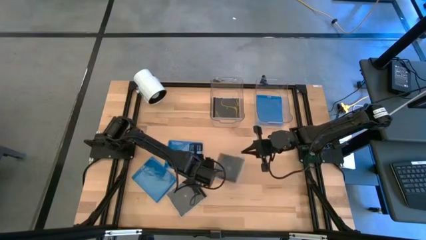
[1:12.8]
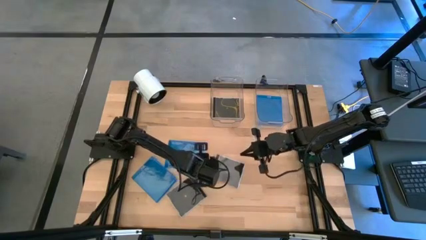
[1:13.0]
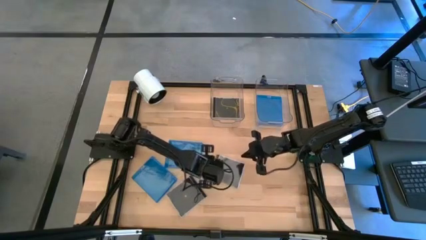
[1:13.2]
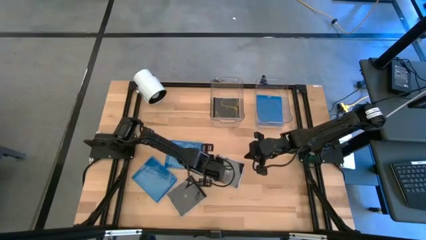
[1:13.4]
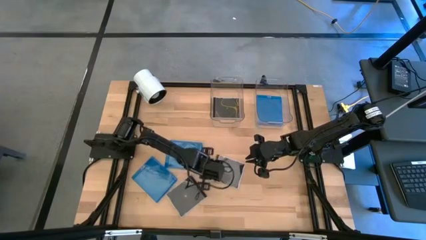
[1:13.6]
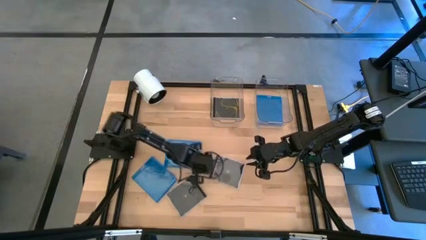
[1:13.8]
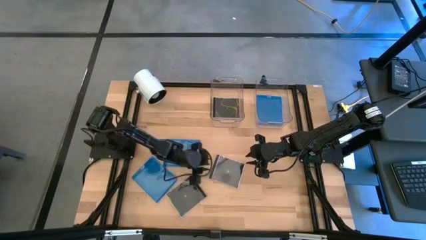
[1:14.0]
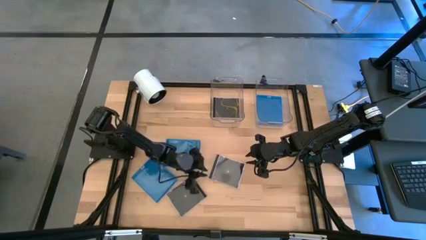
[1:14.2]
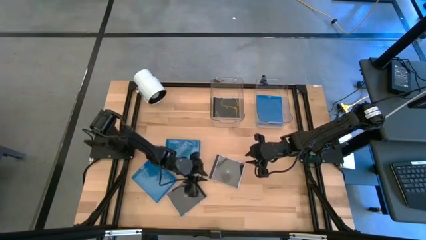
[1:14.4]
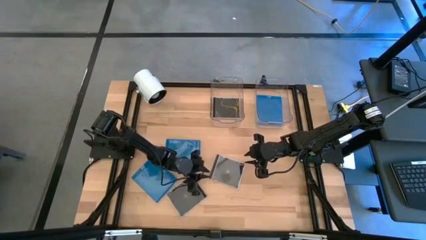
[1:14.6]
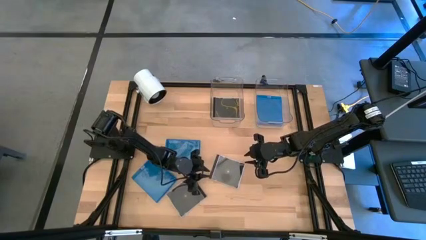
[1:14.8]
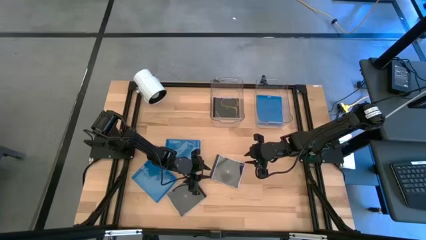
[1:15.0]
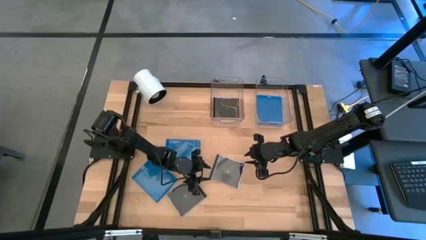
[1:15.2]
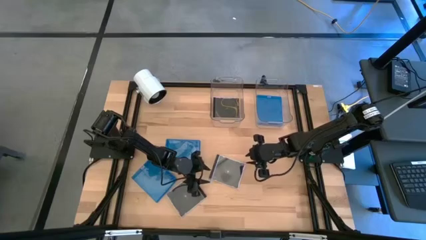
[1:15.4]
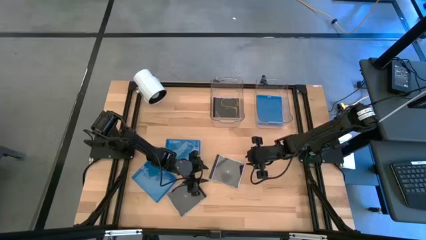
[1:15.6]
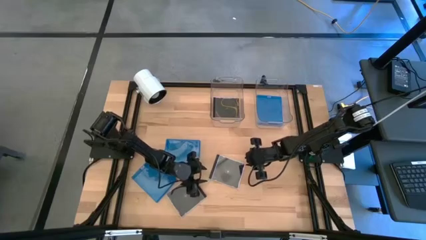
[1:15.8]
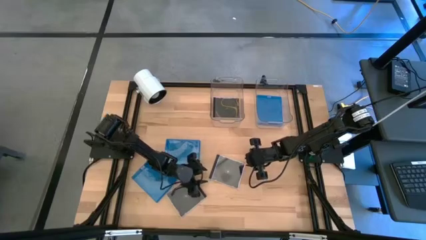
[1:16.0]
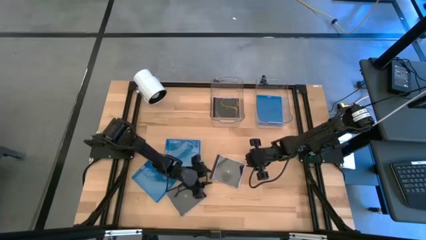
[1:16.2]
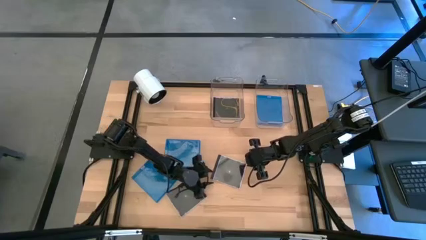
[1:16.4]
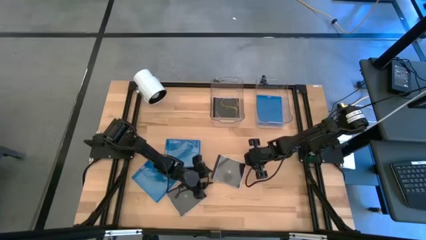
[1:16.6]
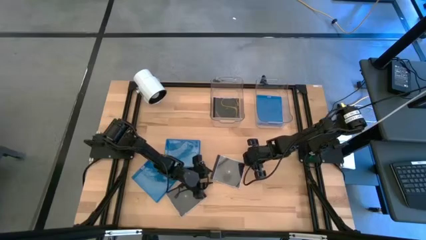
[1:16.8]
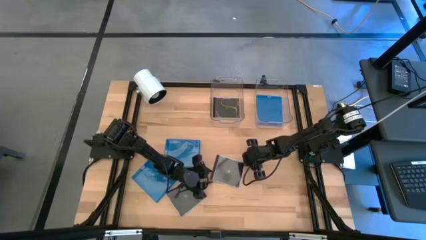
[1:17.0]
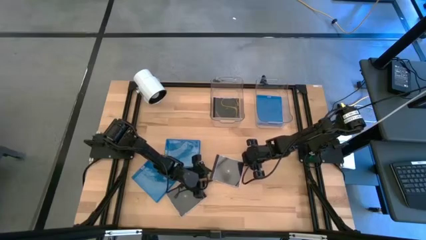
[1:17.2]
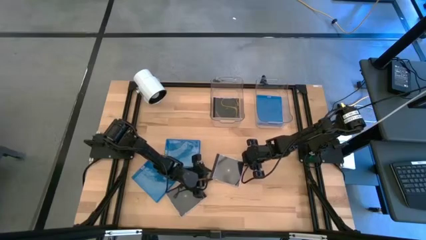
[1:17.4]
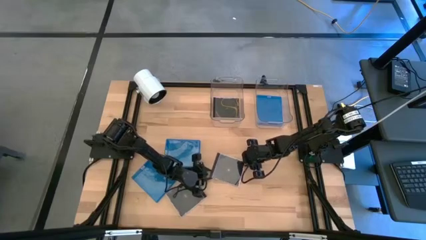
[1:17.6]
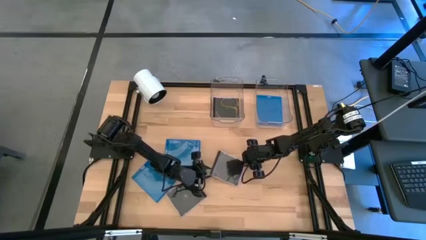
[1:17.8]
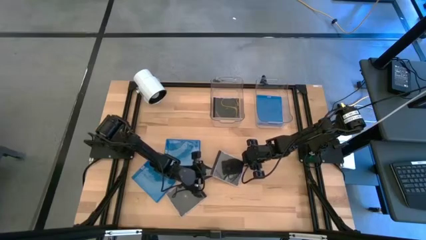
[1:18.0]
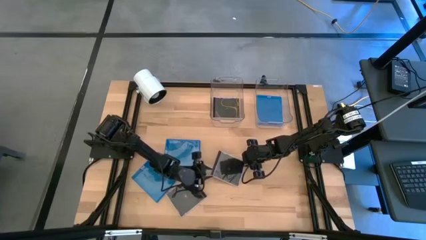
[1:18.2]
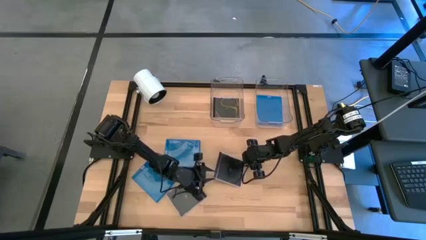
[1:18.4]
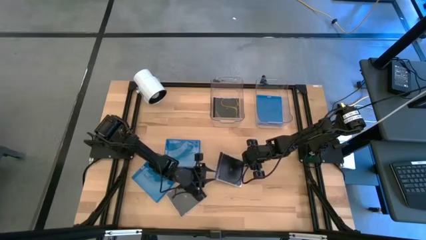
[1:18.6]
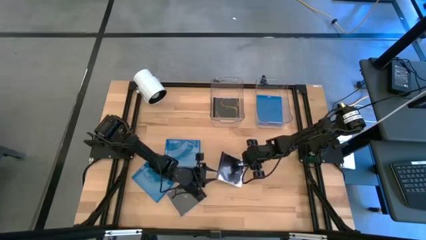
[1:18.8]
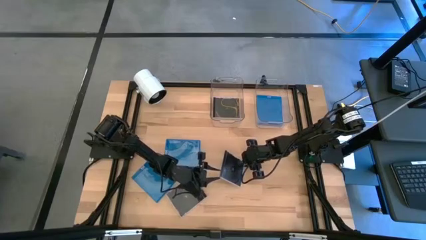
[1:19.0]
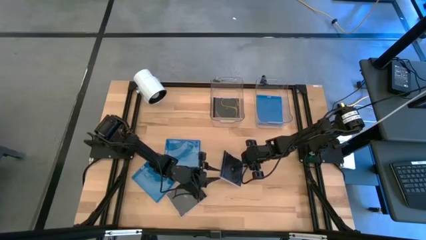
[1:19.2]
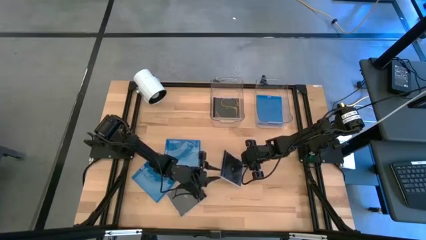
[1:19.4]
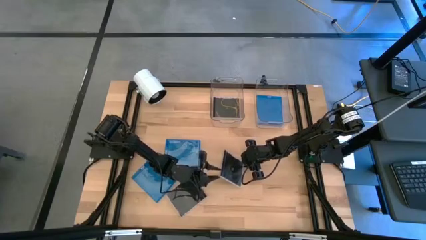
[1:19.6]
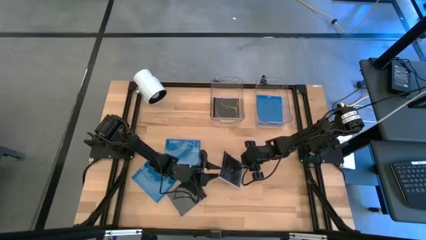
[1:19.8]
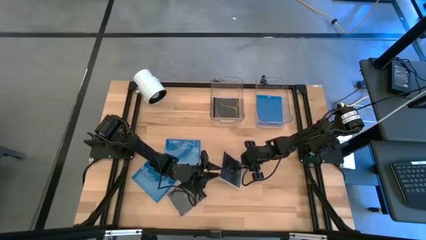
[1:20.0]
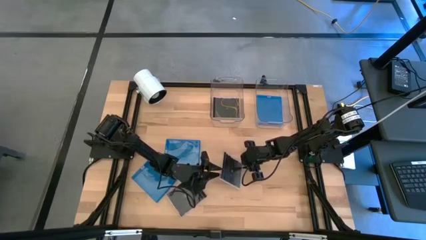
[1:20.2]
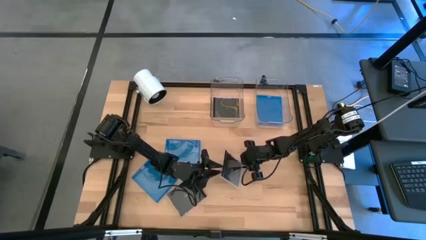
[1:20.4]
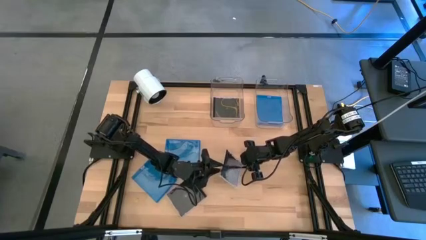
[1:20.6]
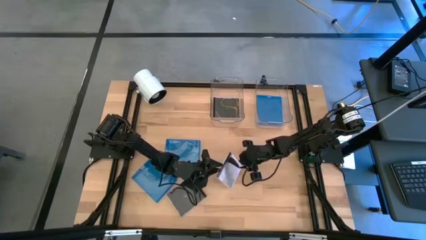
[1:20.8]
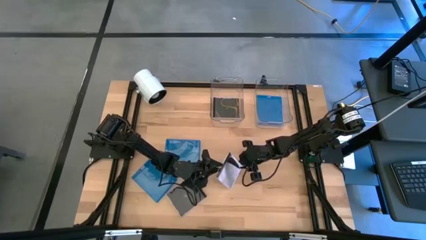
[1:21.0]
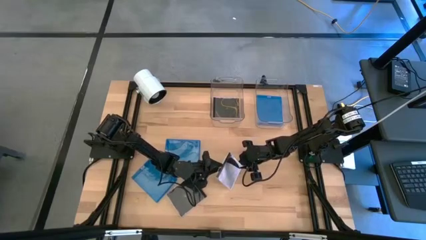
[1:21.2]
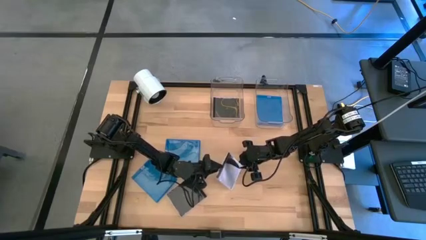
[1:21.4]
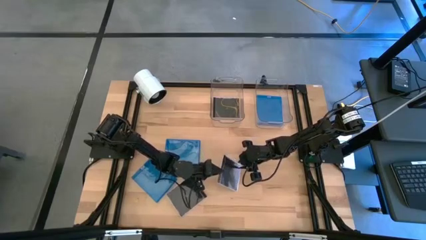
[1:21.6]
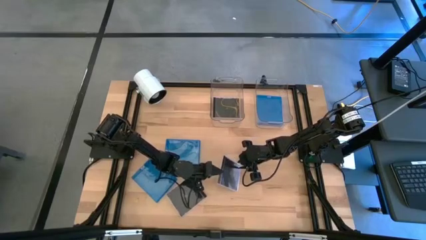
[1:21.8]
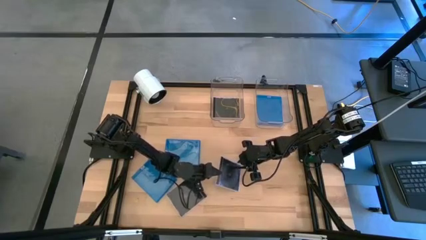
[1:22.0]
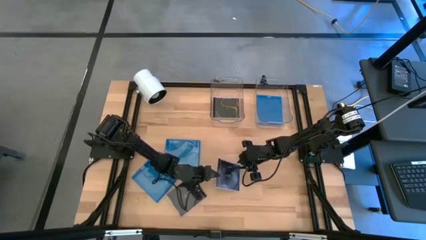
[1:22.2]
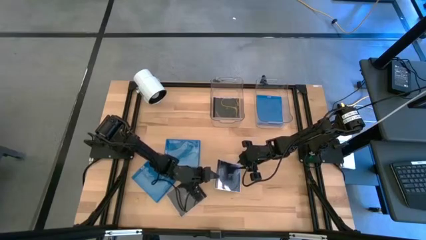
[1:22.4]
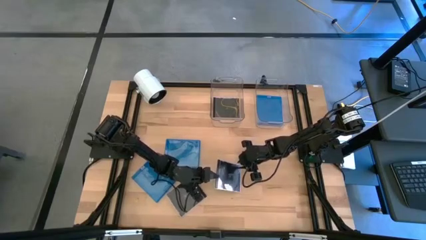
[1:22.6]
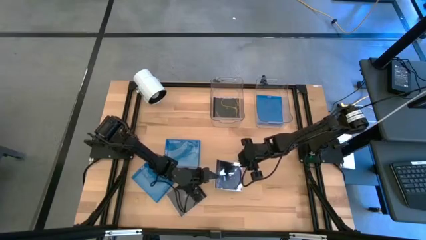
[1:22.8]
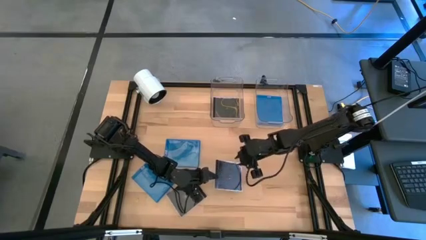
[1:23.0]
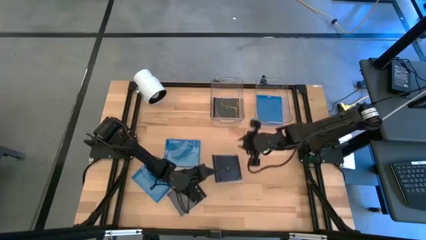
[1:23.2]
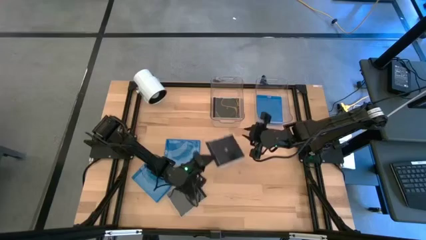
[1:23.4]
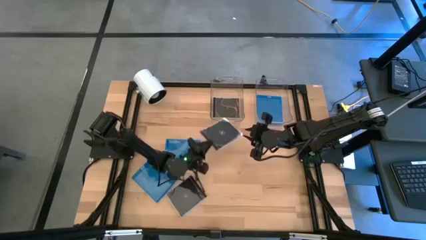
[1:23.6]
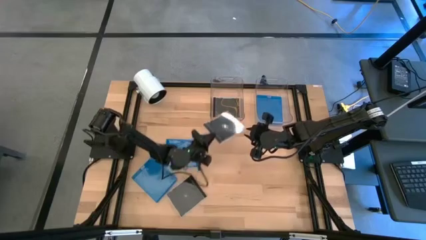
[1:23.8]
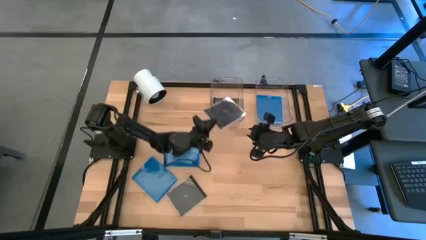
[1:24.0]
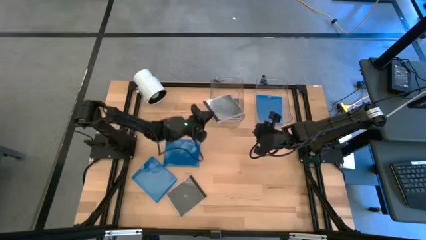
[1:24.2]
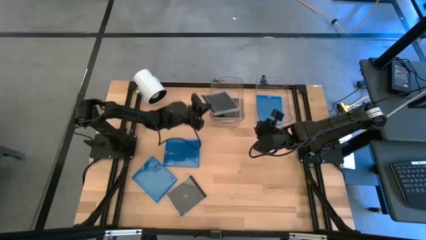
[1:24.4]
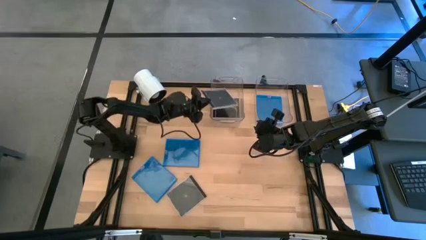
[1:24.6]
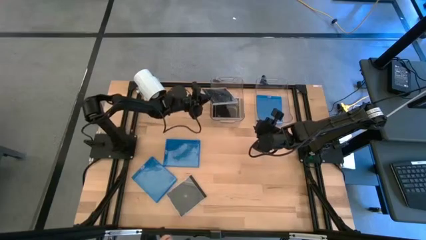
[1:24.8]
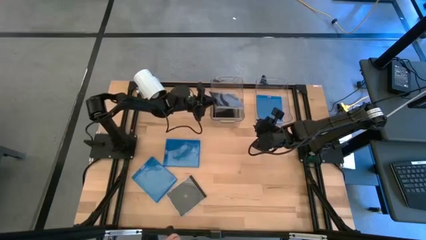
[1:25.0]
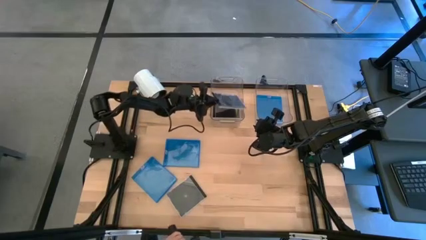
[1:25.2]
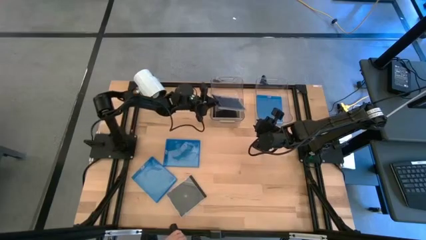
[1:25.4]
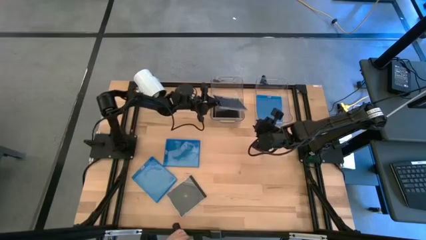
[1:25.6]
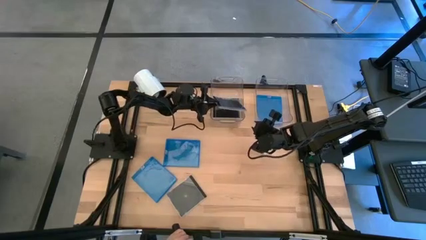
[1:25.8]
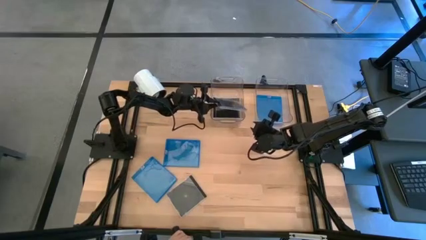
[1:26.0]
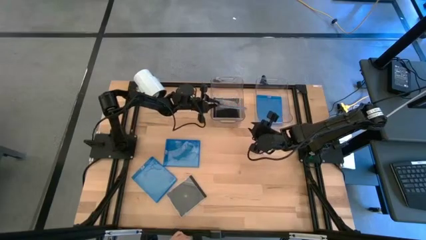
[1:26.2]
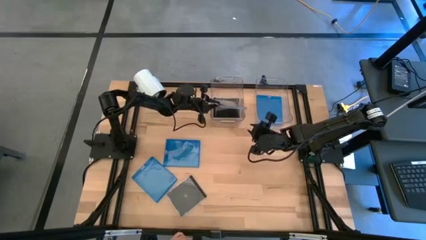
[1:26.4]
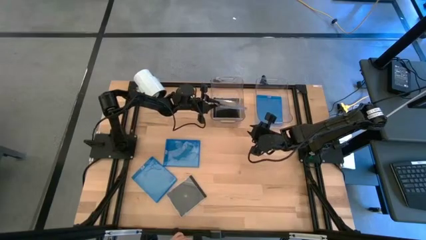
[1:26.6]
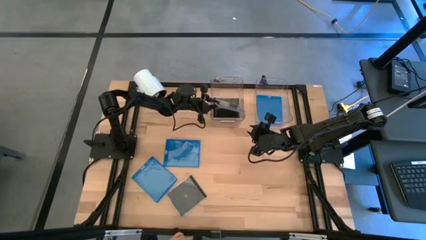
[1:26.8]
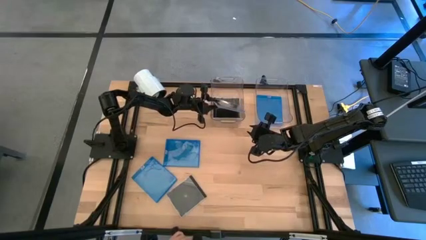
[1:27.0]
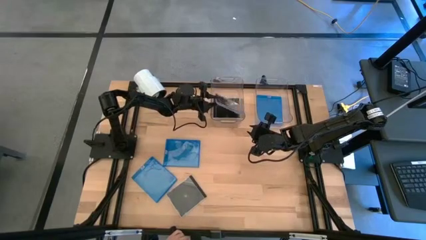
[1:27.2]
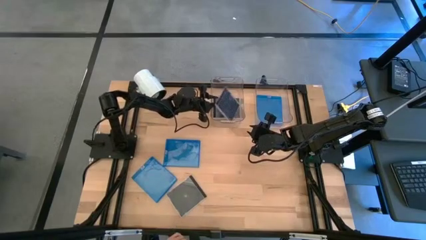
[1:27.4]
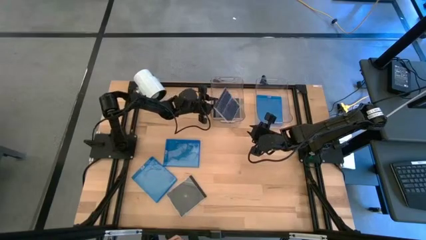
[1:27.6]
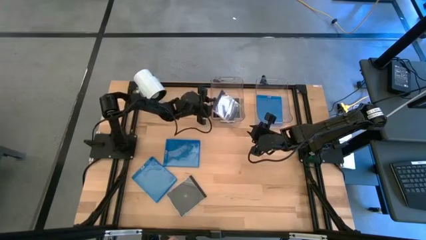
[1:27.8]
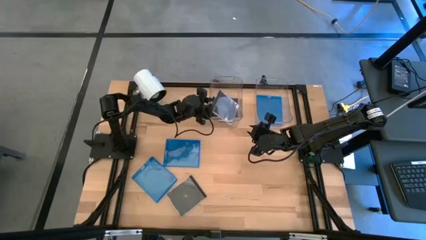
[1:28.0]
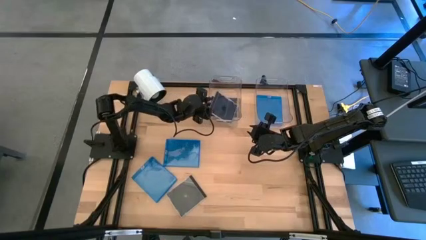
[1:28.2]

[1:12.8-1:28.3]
Task: Pick & place jewel cases by type
Put the right black CD case into the left transparent bin

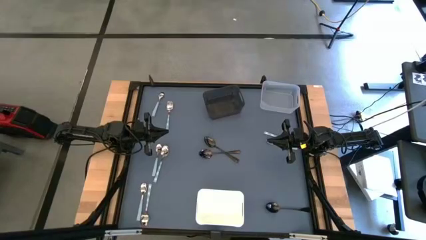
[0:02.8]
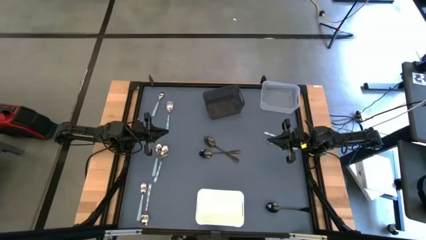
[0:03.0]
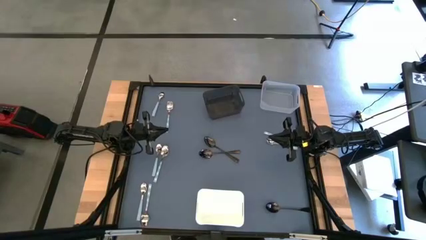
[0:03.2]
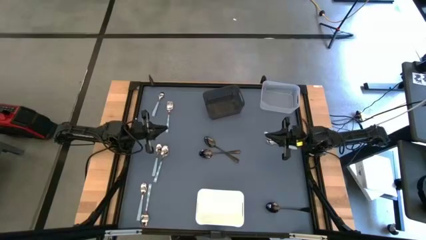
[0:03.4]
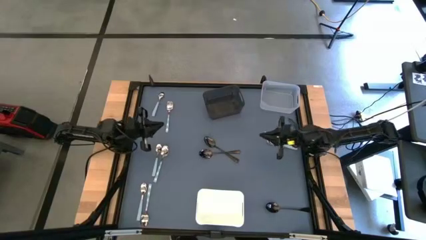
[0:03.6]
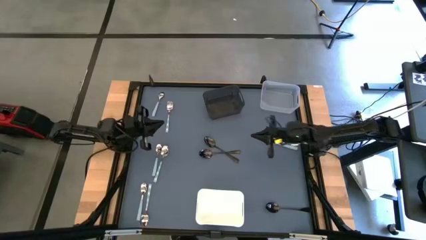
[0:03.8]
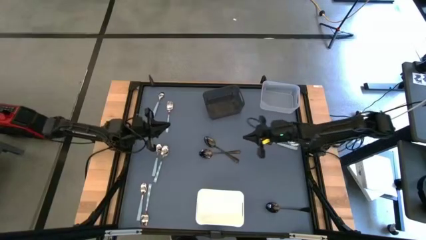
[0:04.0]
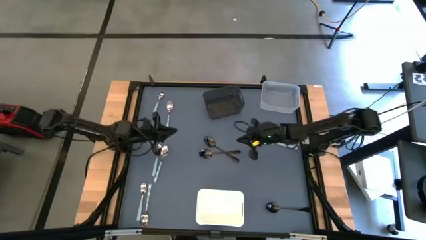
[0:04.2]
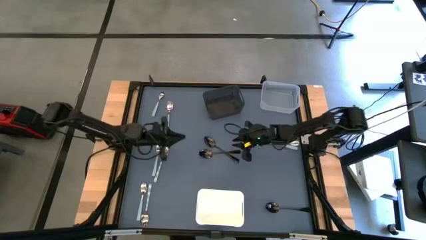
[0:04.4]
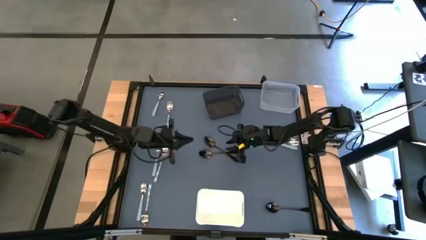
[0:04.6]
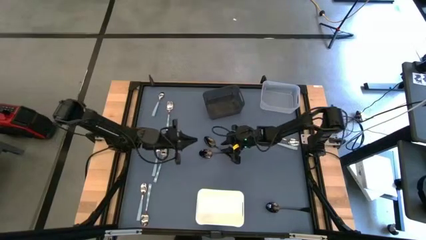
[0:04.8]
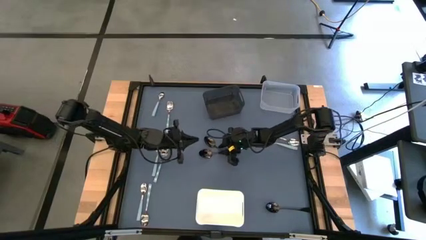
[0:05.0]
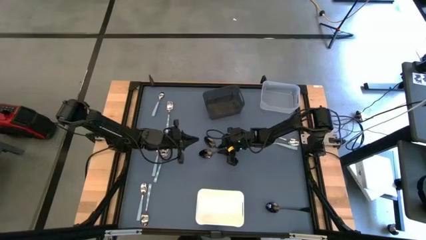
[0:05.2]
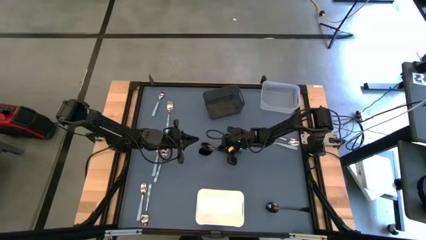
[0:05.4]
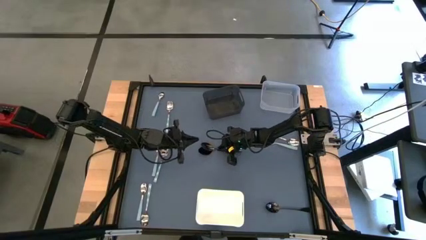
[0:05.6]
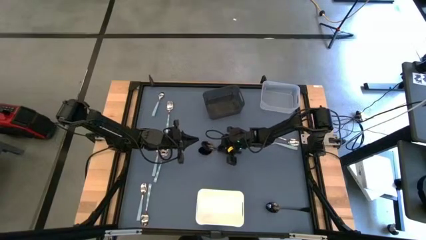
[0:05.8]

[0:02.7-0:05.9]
Task: Sort silverware by color (type)
Put the black spoon into the black bin
